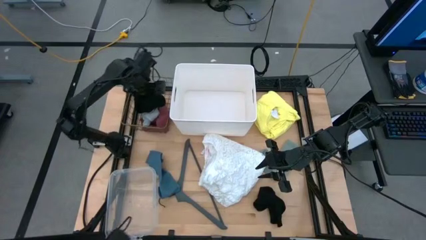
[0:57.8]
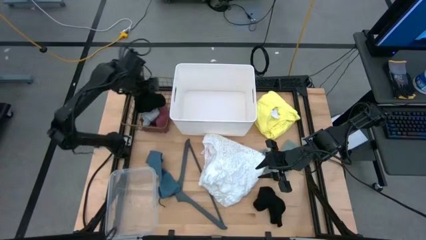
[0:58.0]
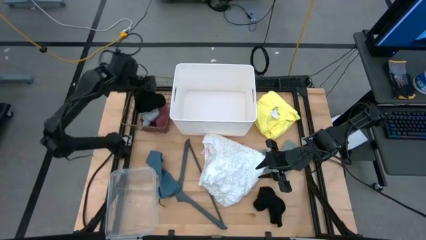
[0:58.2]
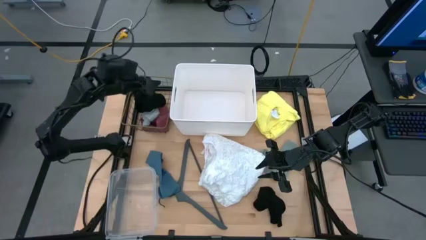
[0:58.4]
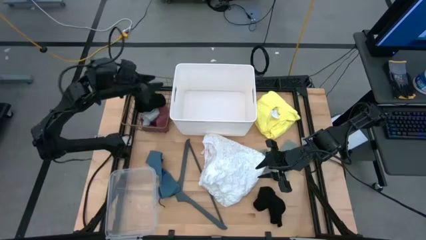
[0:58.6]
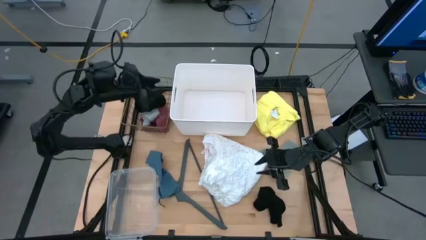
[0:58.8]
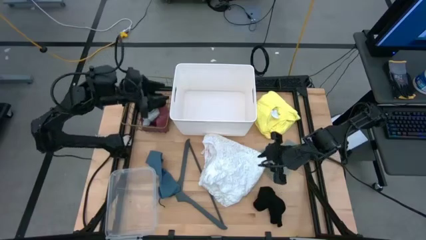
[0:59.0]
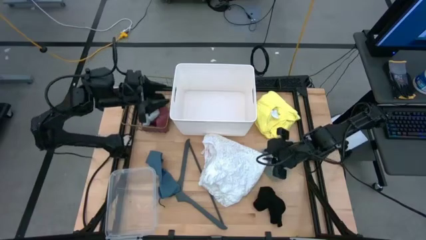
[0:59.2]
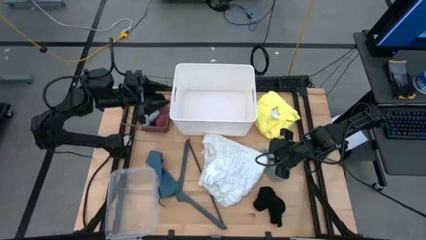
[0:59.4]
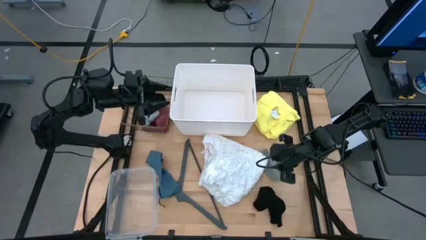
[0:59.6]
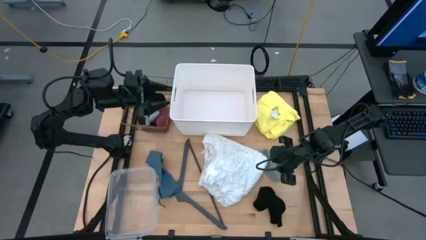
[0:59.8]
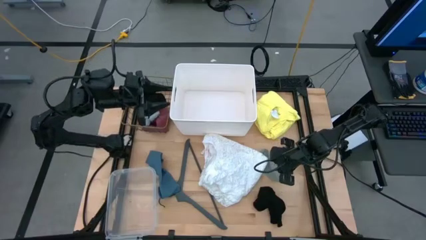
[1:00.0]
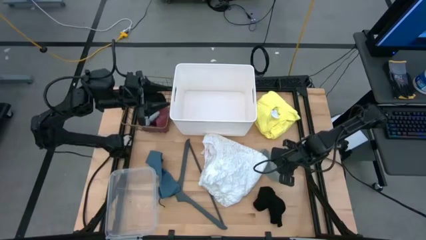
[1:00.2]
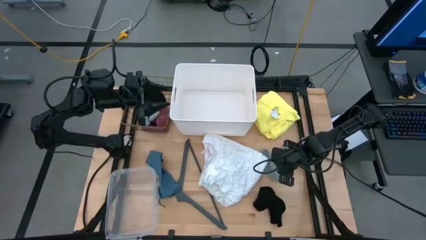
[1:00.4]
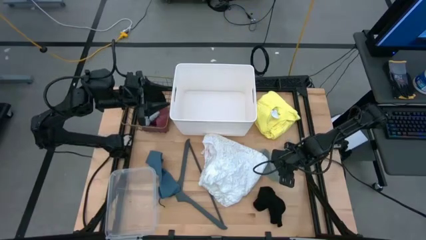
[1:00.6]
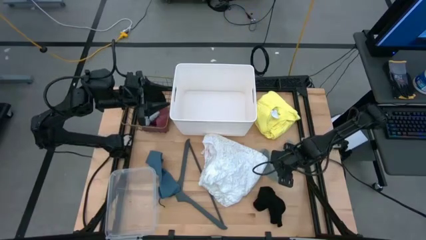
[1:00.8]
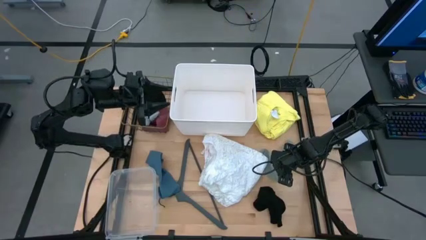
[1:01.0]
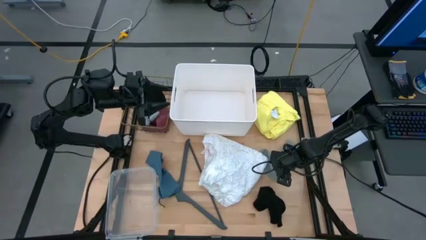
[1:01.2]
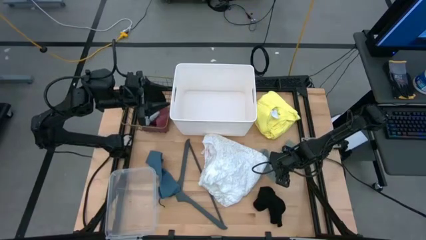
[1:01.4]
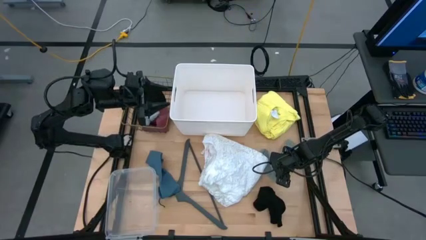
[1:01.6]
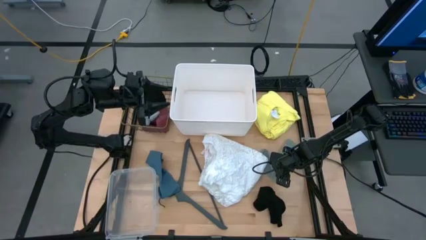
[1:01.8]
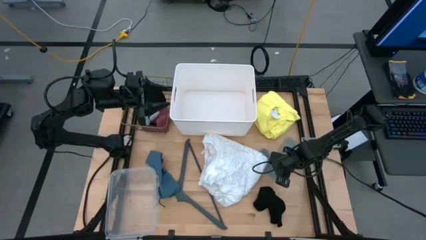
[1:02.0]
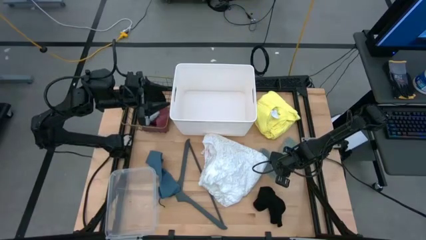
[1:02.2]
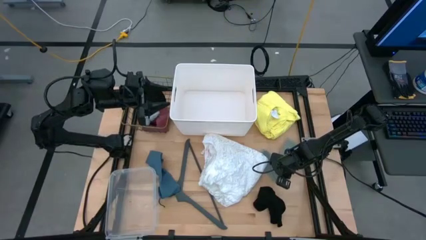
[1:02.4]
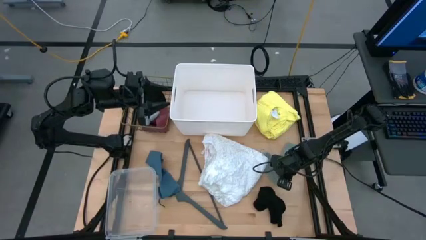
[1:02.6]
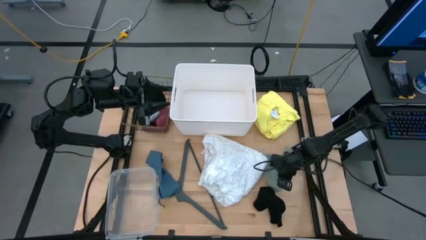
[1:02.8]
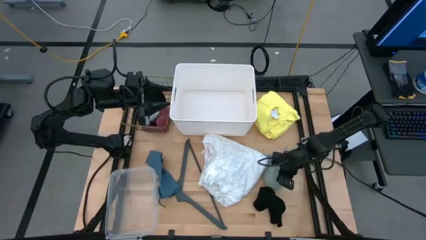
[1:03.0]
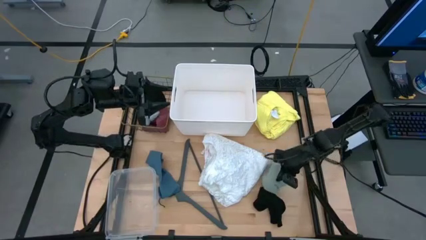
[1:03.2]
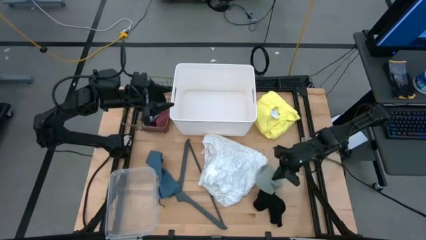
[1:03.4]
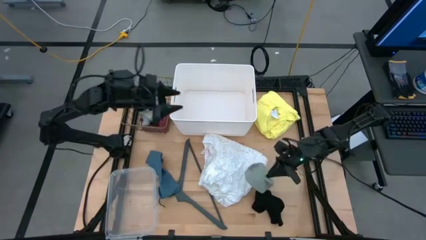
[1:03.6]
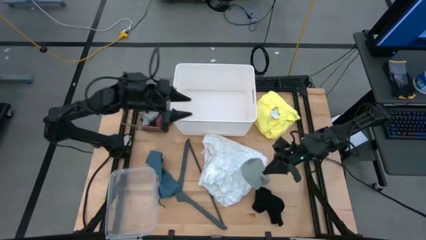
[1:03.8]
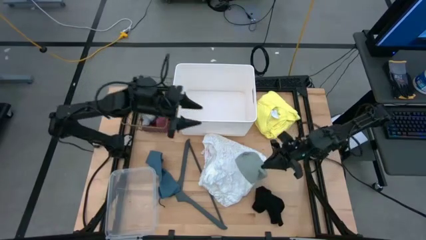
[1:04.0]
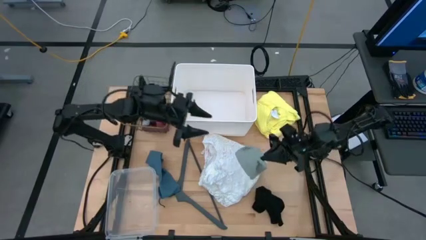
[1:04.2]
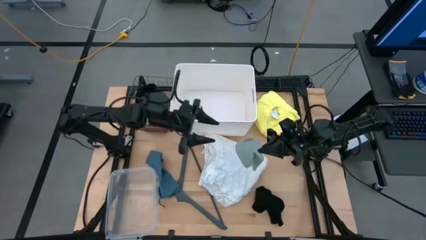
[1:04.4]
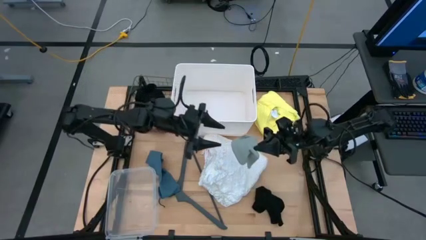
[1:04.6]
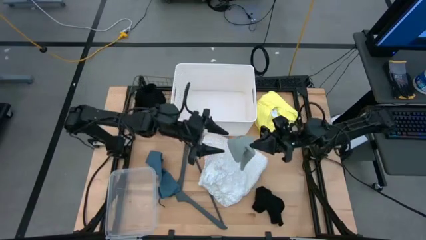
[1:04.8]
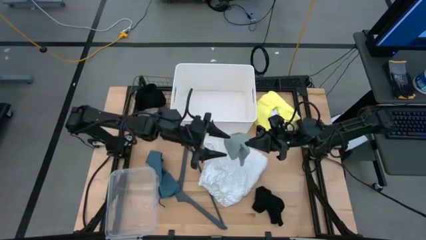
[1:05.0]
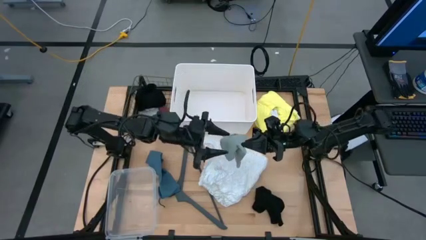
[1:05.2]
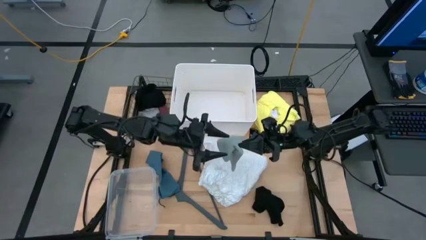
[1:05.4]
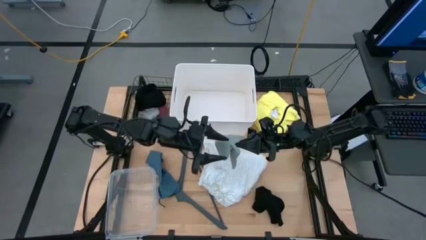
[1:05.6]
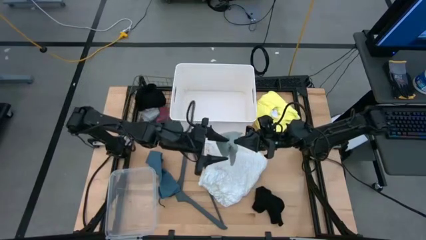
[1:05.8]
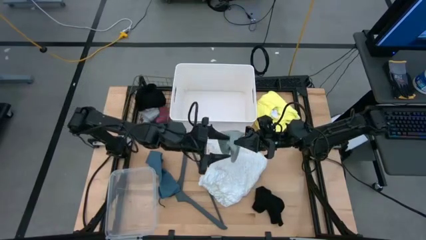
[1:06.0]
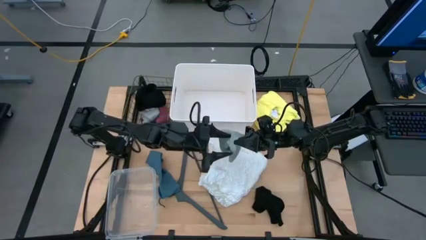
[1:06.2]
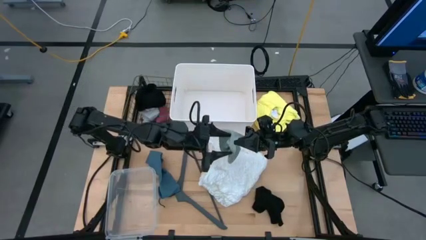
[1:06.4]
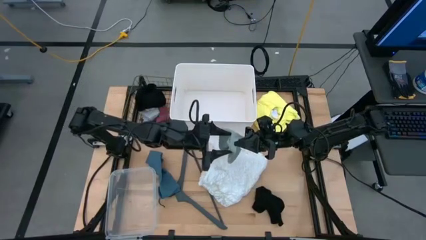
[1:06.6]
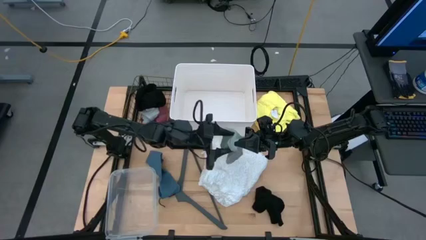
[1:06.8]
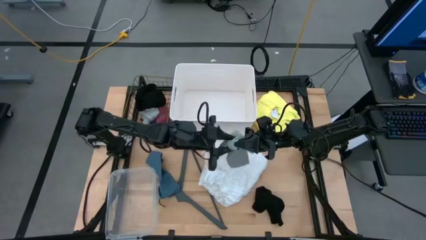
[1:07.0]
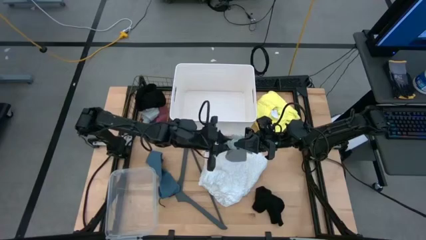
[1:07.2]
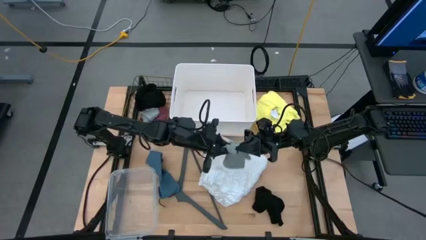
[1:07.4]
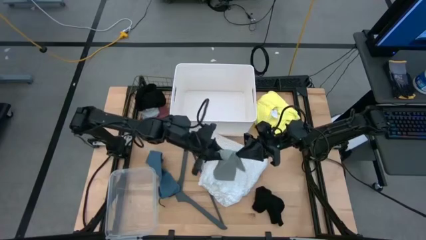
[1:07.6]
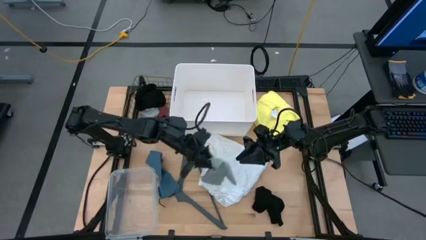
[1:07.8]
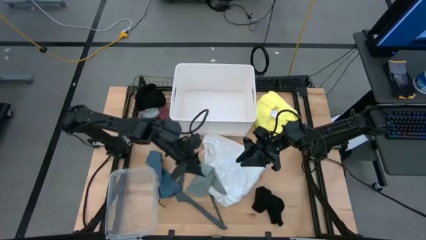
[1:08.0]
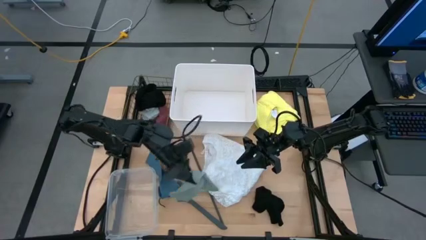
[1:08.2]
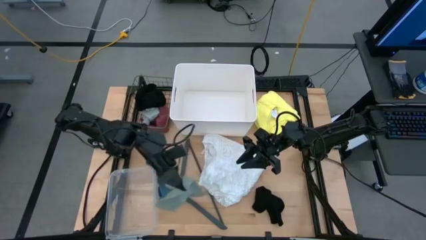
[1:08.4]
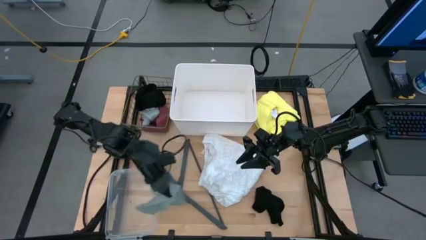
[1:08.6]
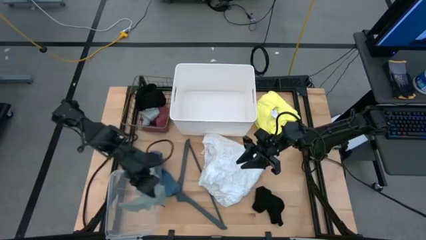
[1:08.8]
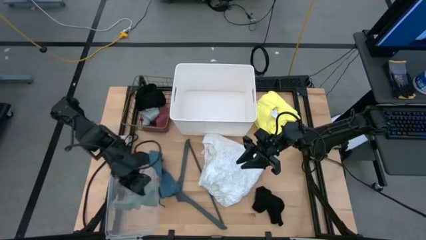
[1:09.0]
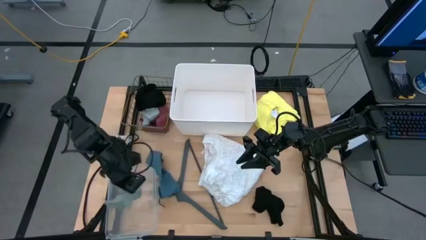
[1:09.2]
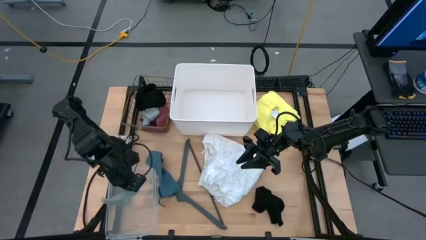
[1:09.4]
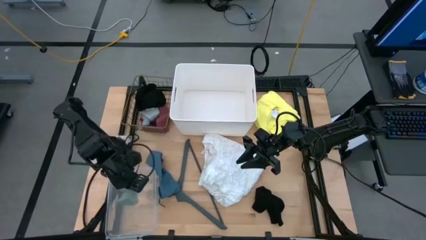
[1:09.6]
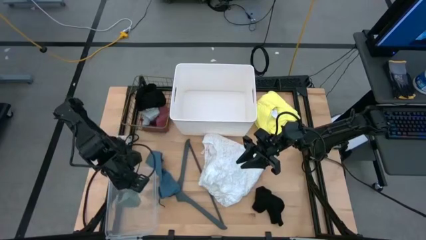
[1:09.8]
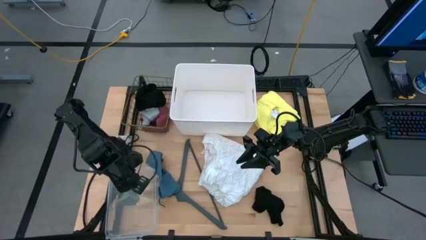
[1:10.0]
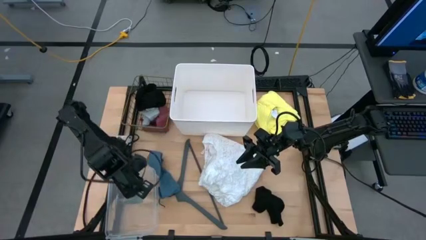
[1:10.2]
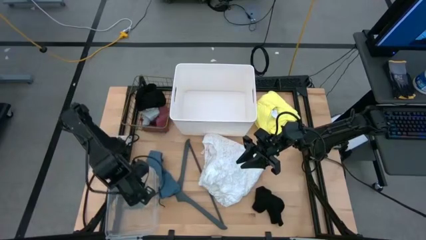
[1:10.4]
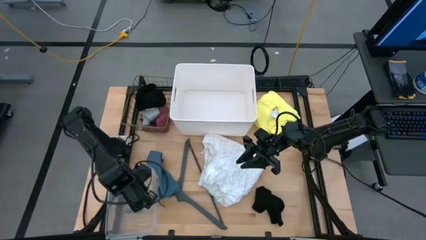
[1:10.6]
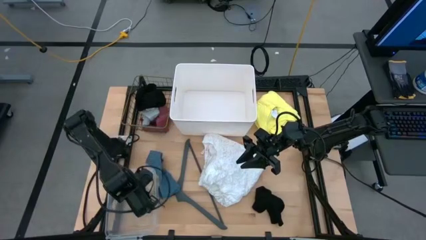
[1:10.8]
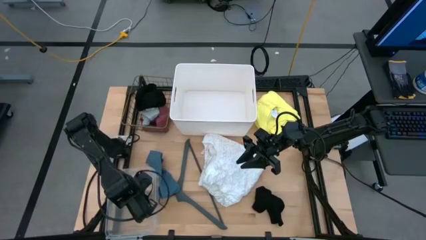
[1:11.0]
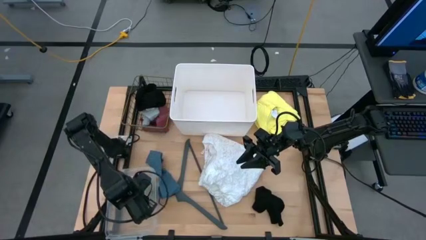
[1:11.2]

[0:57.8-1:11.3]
Task: Pick & Place Cloths
Put the gray sock into the transparent bin

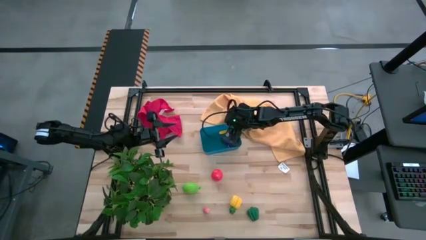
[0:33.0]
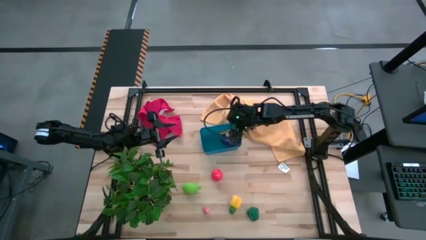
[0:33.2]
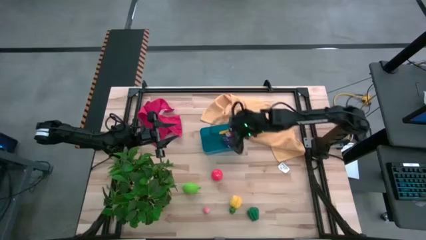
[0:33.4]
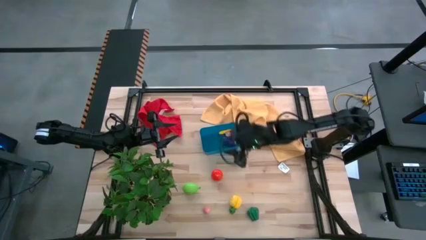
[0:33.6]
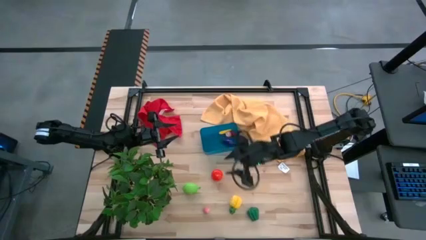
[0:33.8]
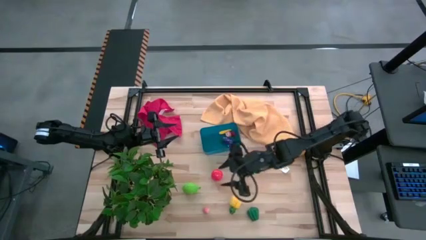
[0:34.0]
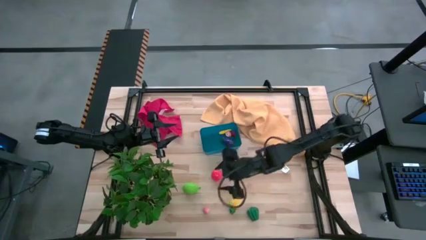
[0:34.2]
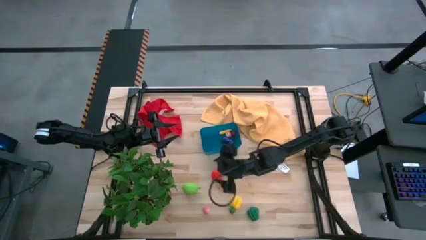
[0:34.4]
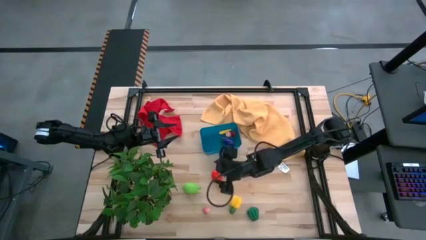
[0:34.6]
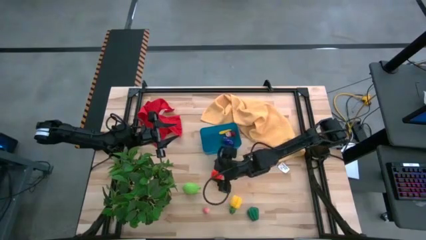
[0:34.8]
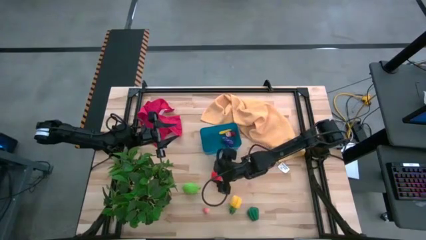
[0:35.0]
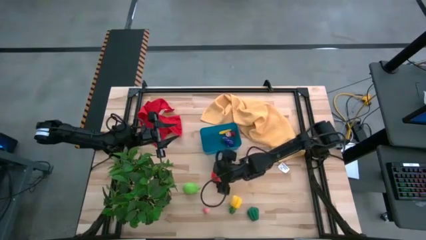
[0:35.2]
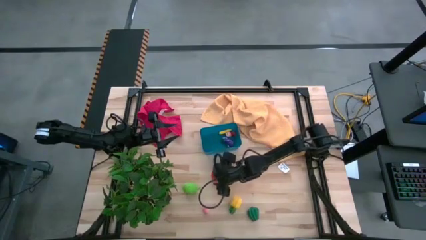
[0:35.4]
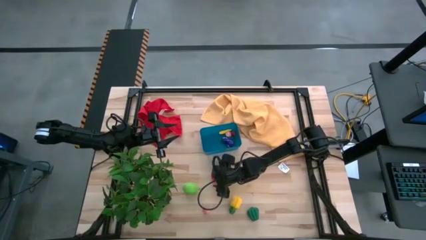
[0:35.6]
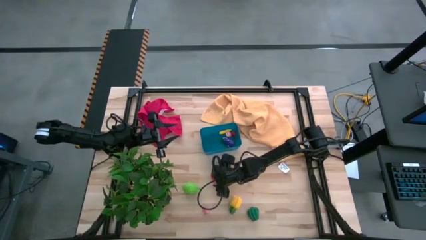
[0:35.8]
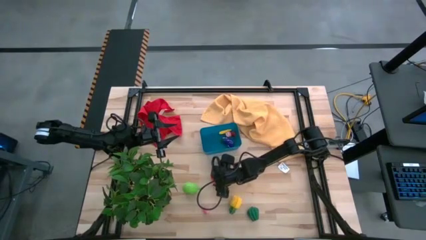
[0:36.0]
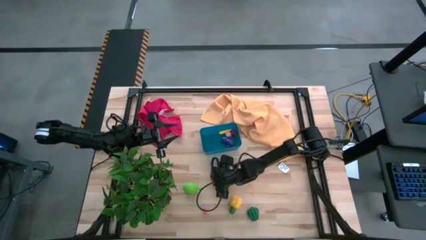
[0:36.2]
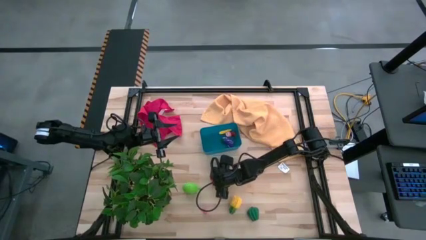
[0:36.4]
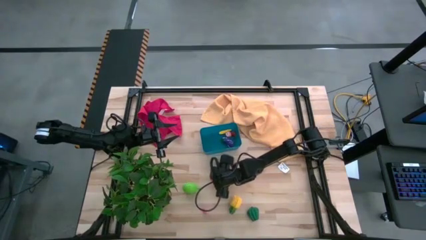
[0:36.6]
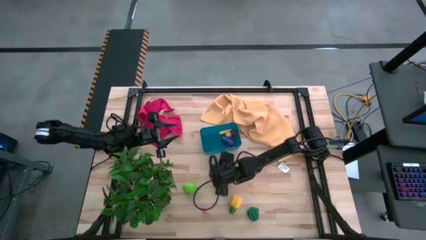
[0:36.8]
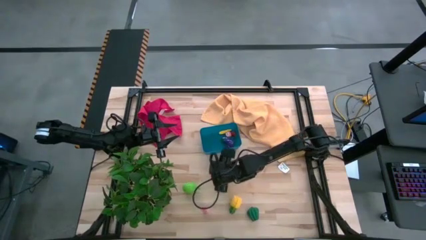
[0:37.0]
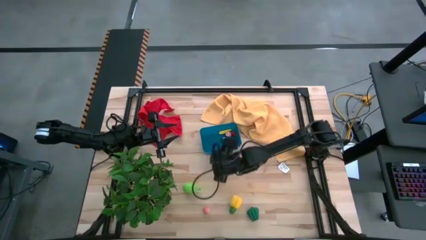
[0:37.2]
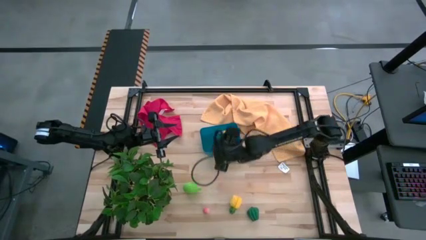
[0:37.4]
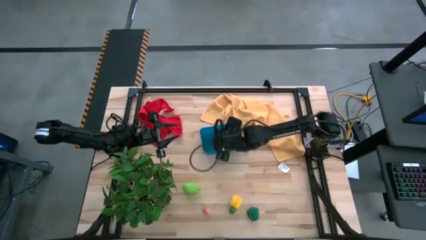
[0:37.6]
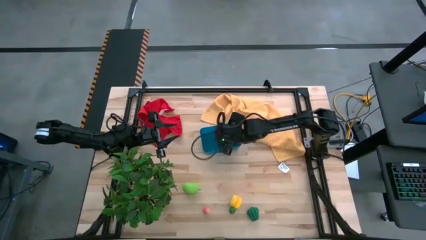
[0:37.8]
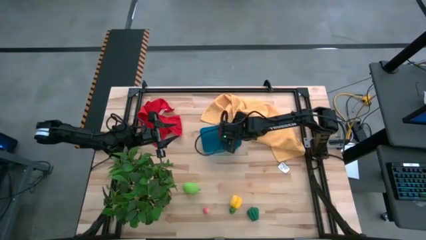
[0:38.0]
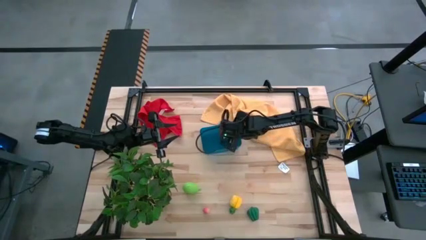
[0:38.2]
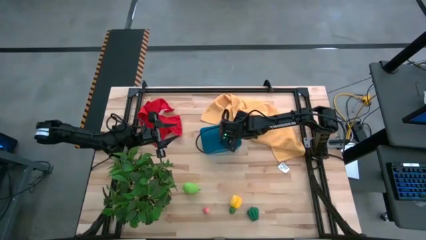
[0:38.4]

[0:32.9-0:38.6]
Task: Pick and placing Produce into tupperware
Put the orange tomato into the blue bin
